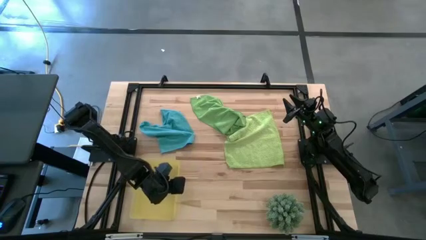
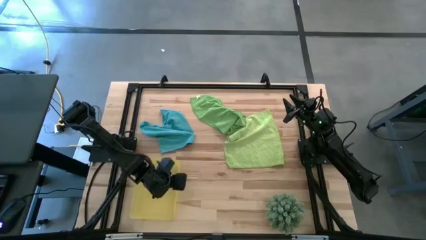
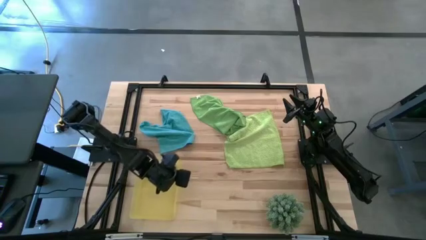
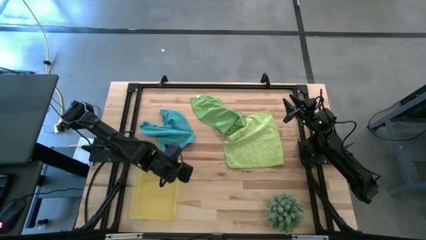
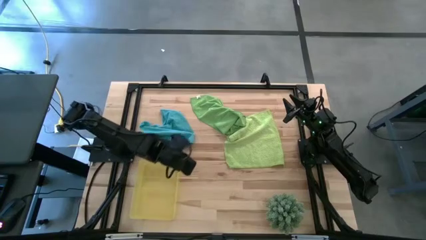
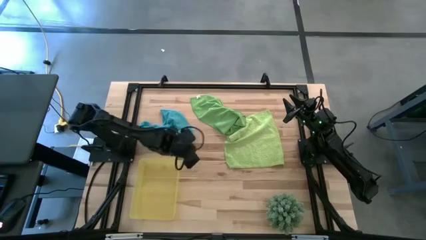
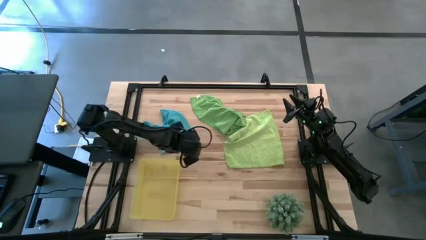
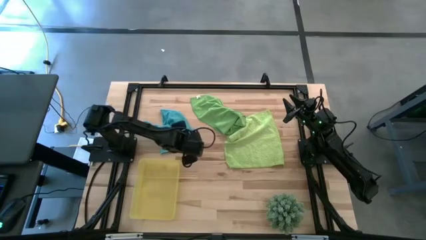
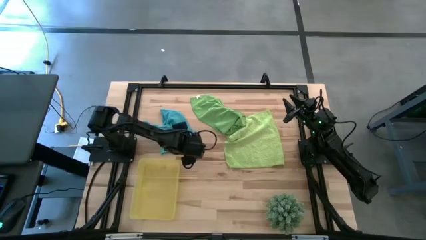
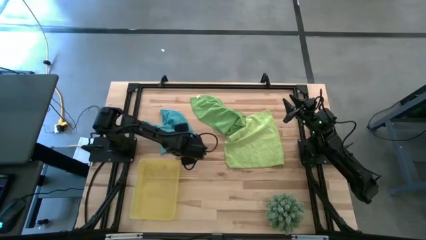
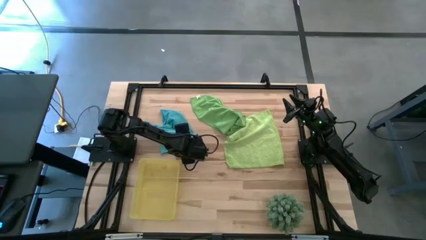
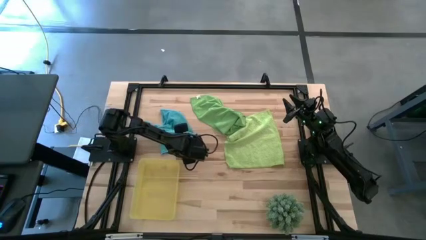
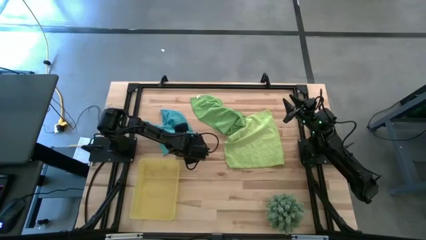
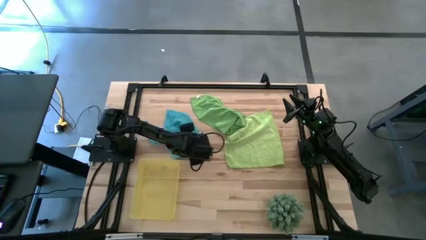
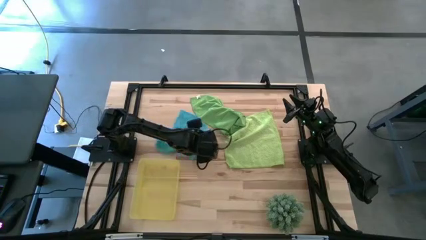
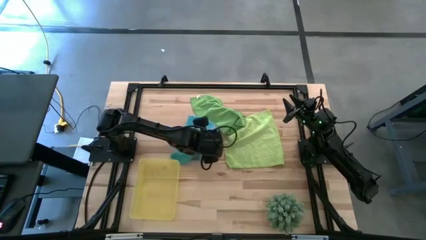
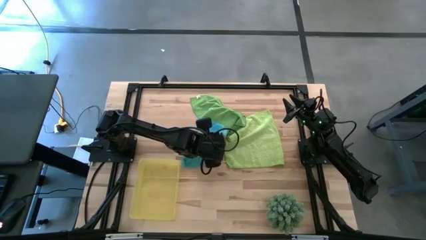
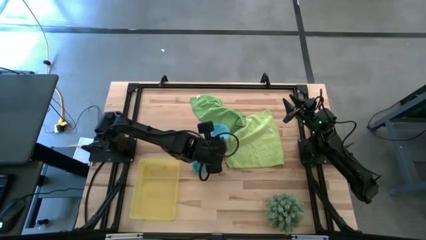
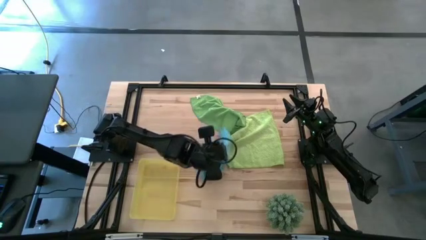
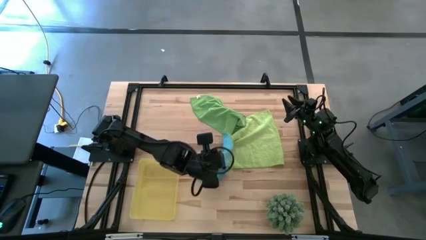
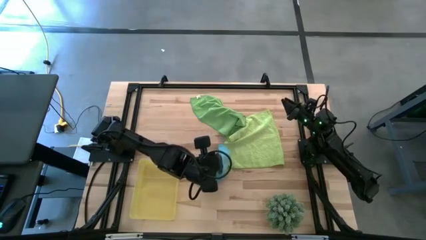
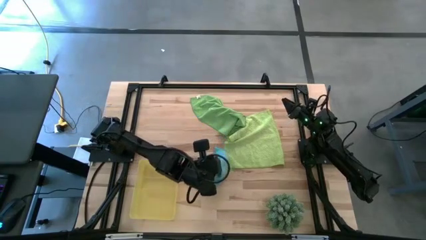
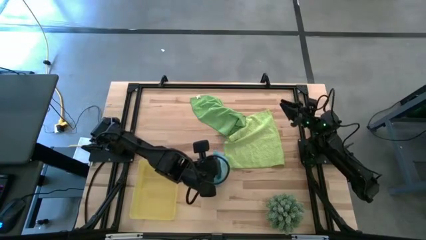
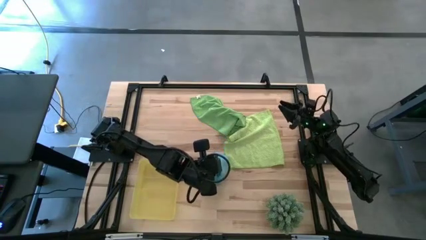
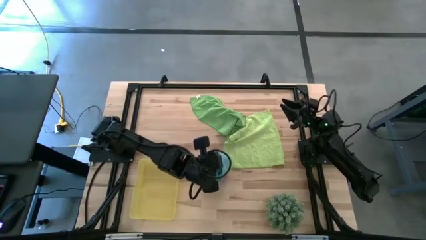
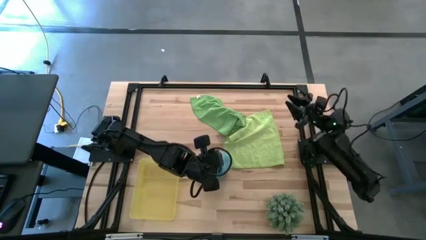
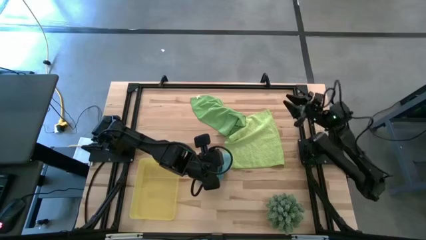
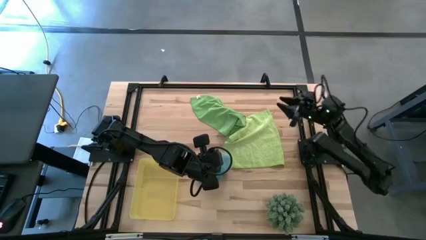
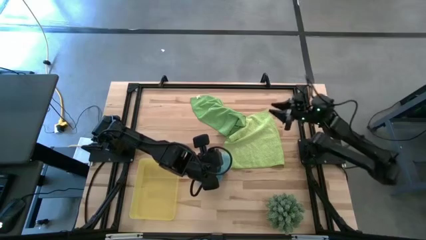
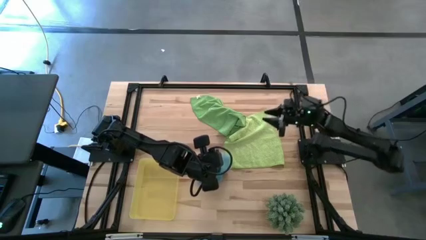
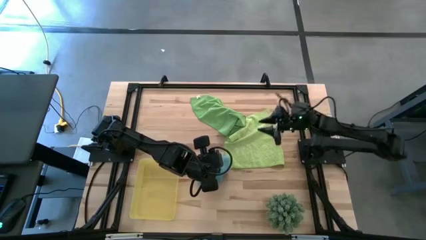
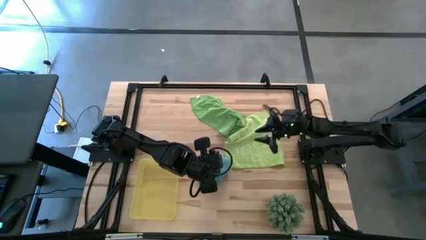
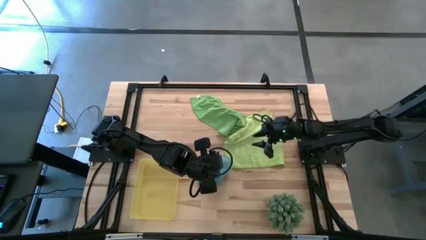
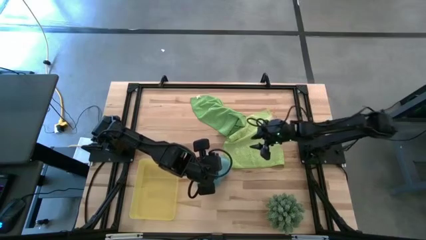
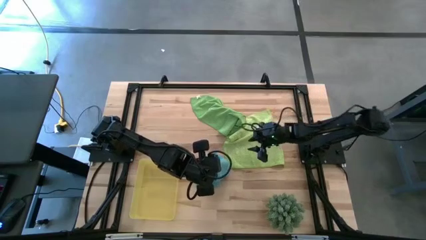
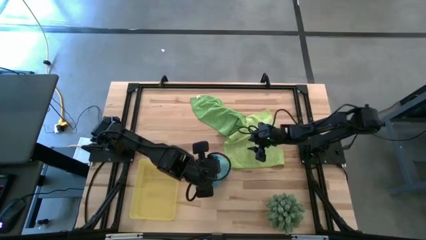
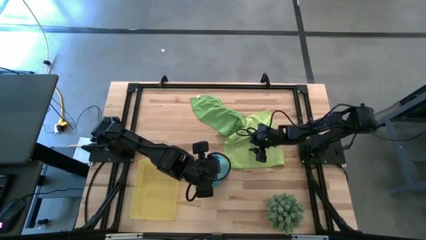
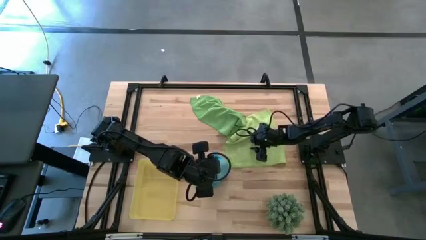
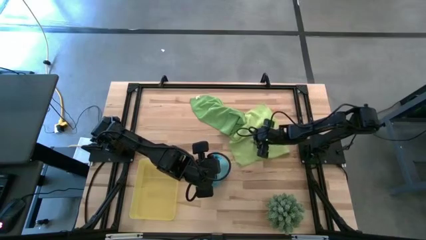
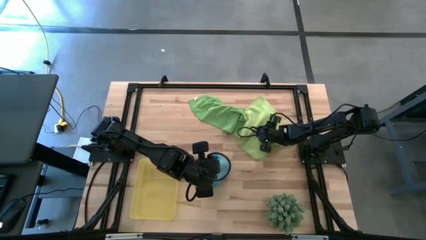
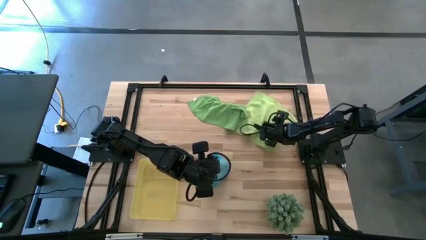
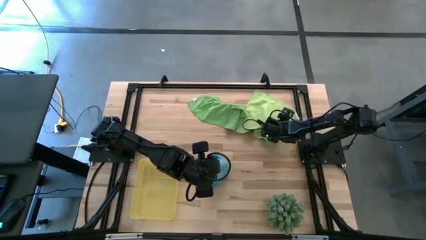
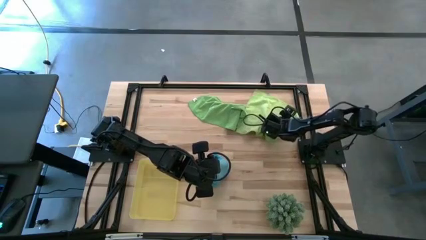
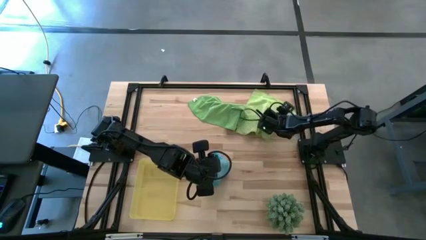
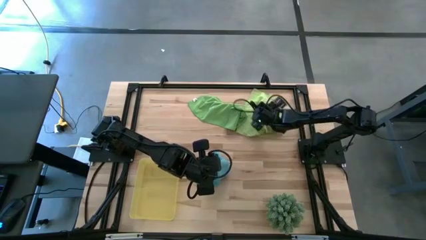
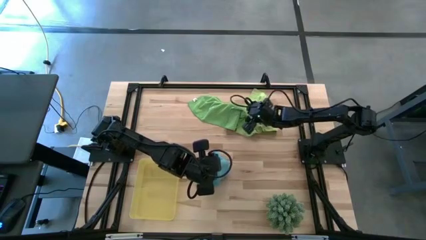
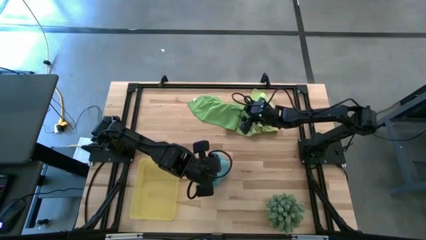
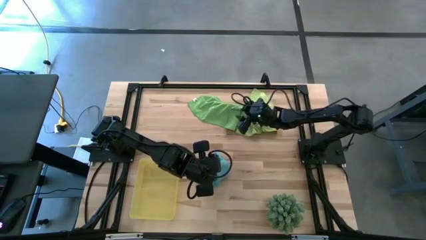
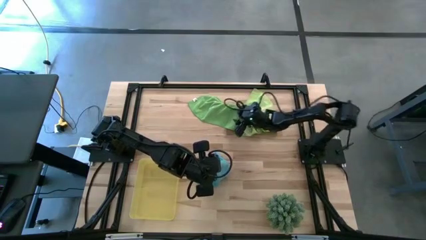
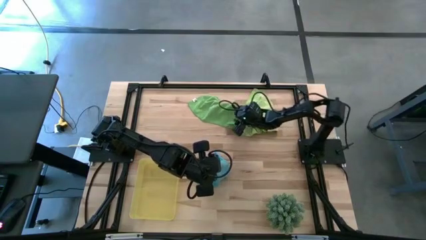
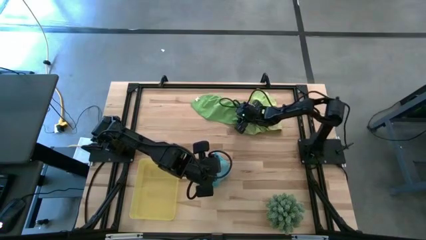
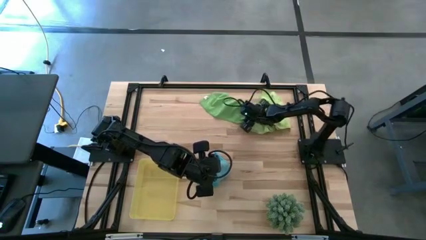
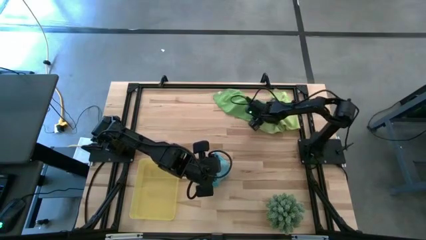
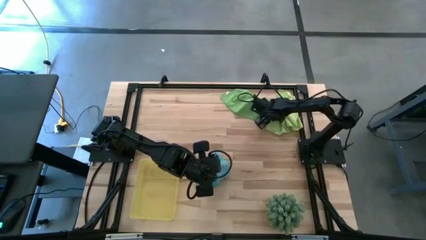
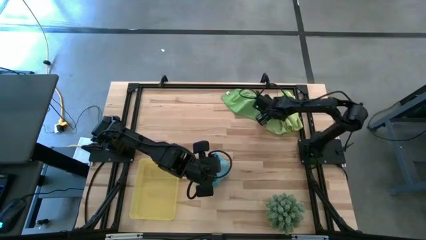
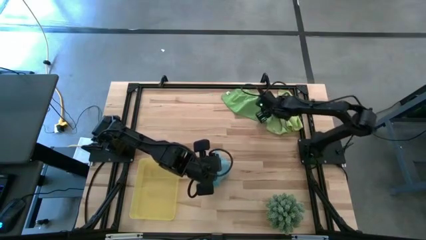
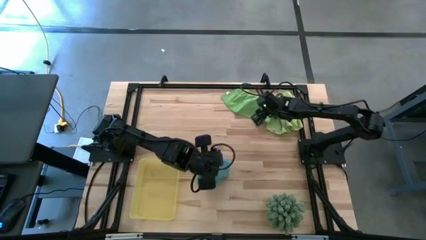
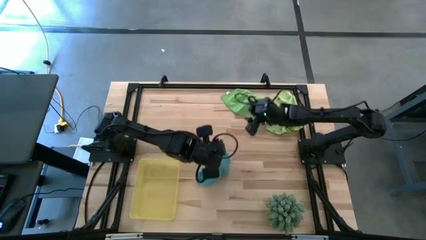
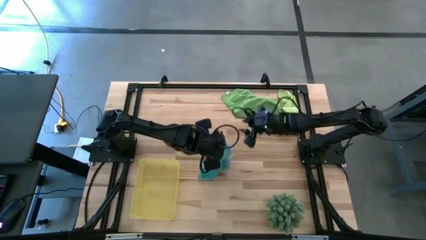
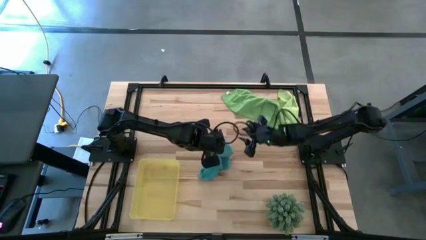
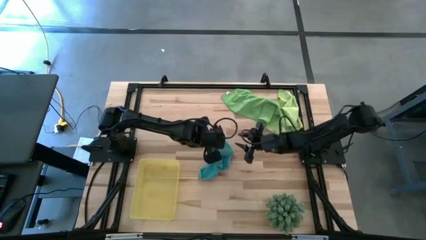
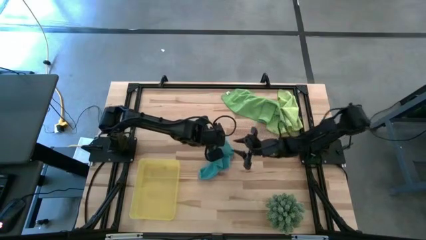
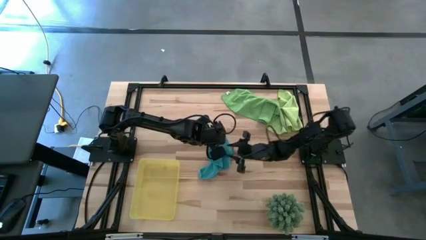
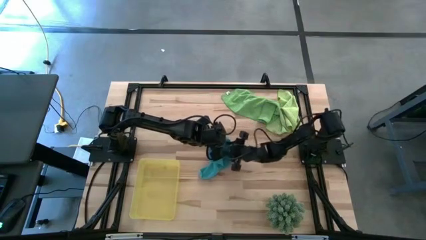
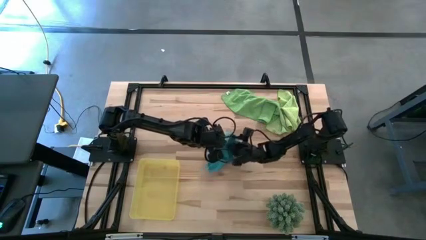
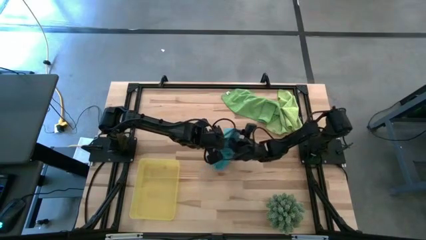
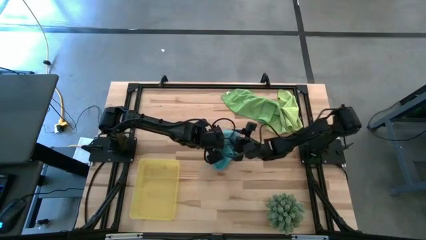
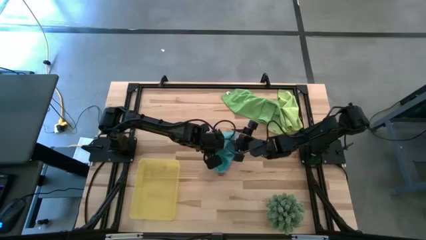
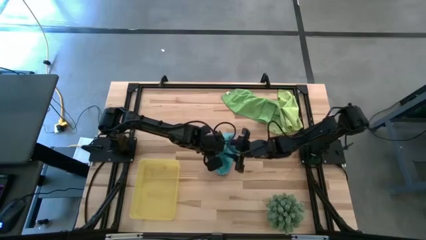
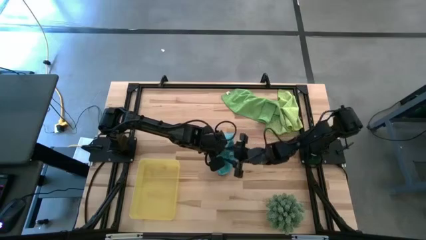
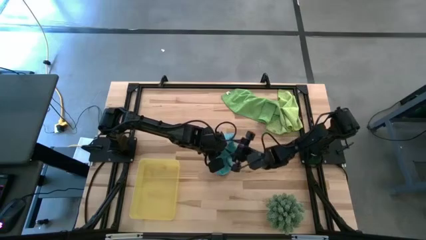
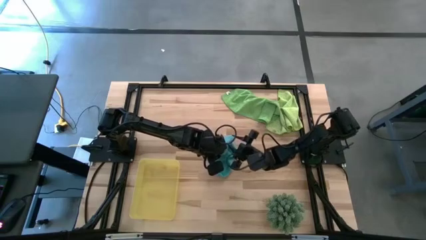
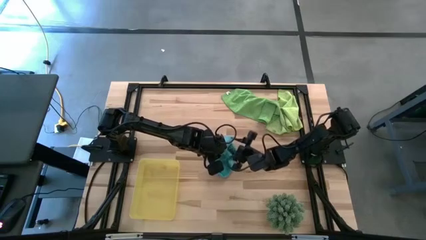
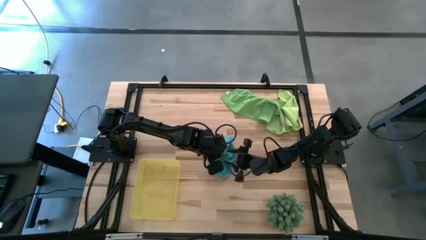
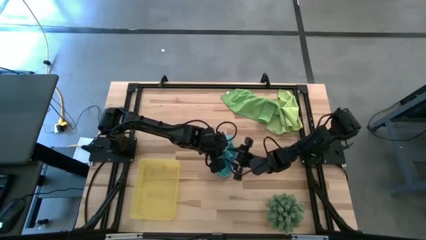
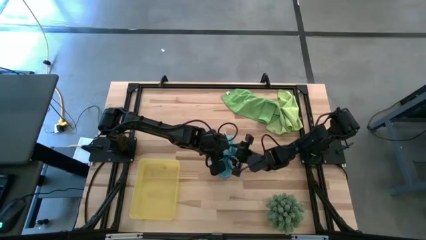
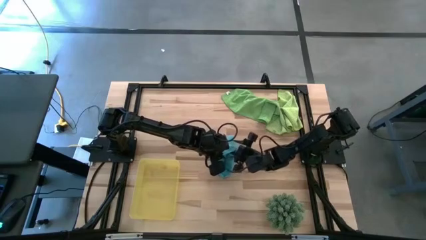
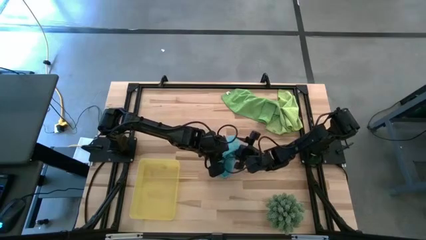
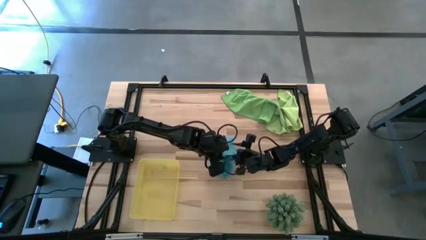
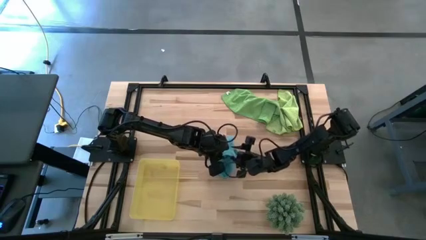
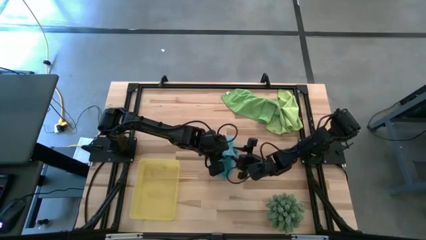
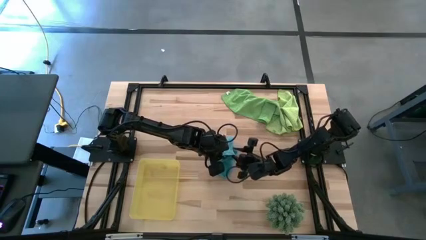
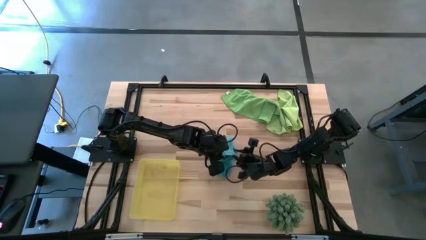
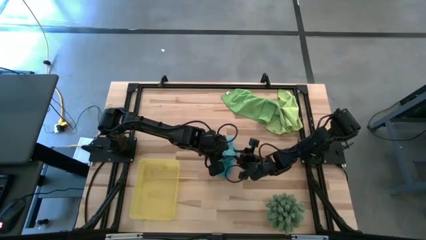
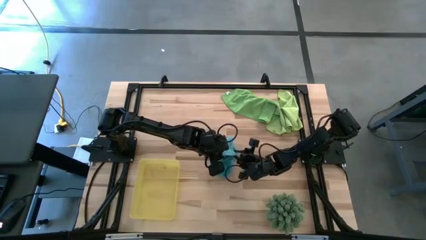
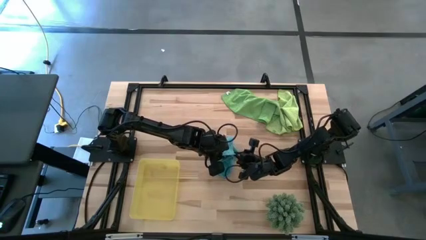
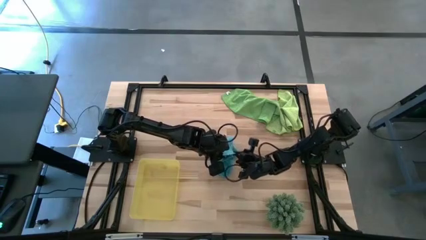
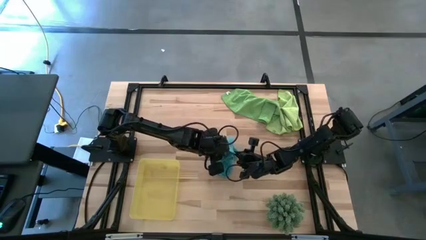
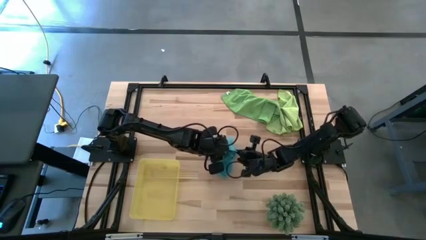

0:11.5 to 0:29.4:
Task: Roll microfiber towels into tight, uniform cylinder then place into a basket
Roll the blue microfiber towel
